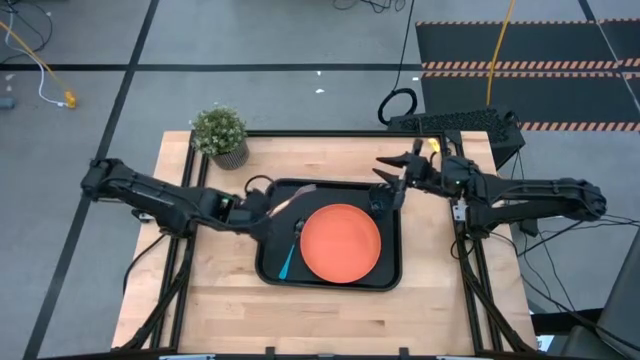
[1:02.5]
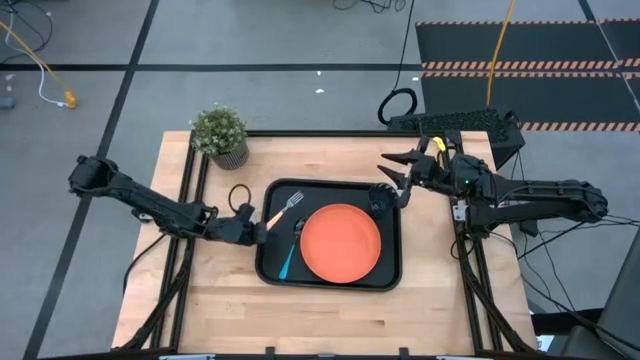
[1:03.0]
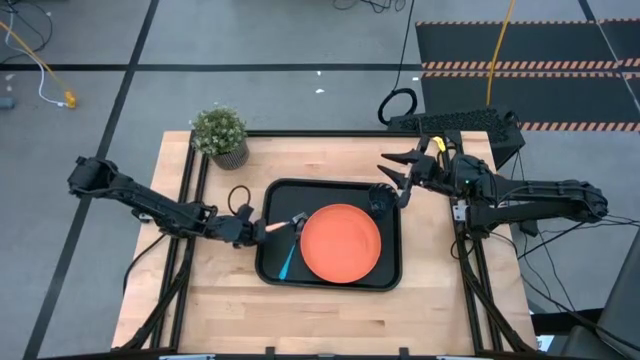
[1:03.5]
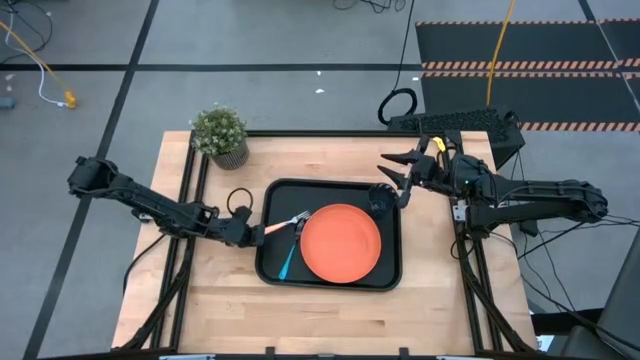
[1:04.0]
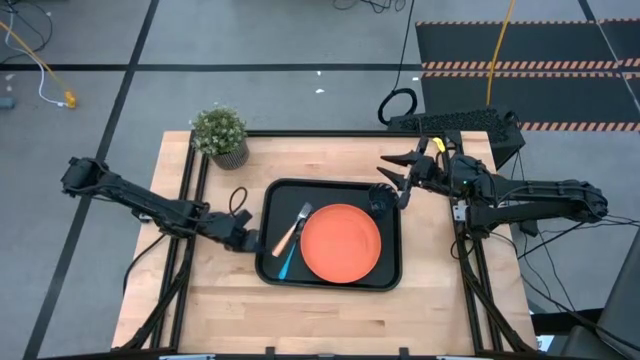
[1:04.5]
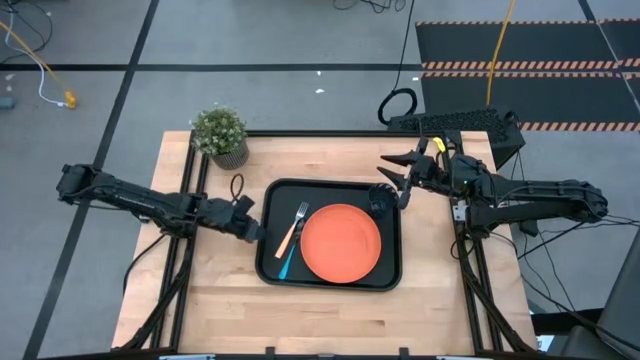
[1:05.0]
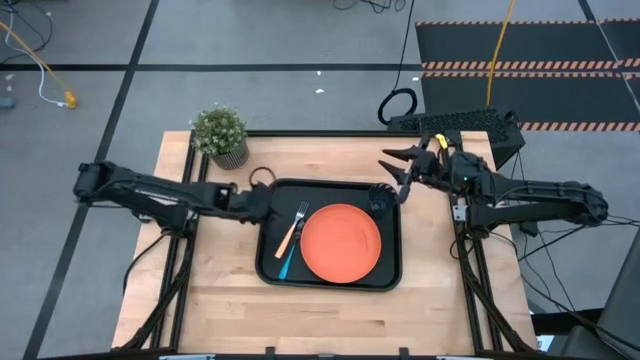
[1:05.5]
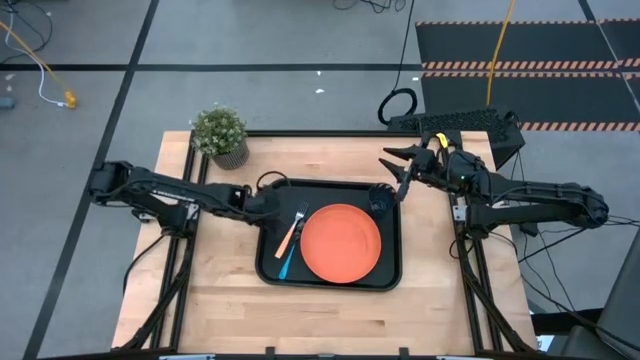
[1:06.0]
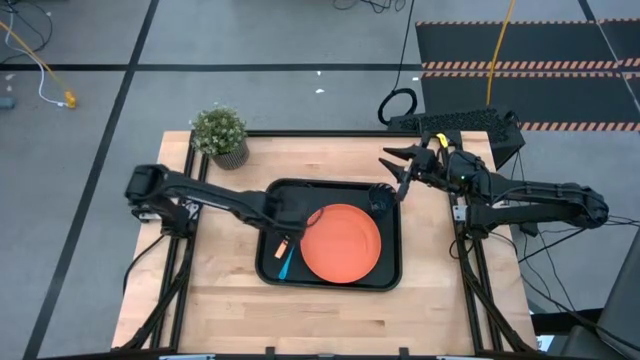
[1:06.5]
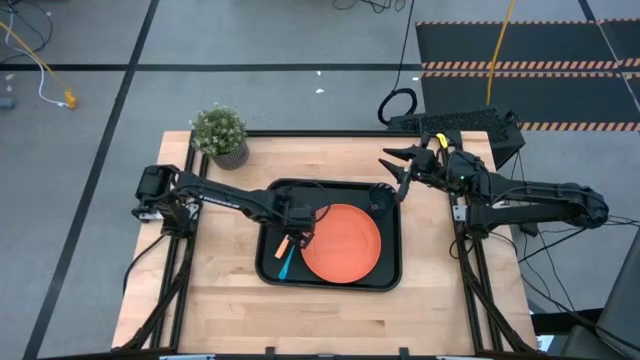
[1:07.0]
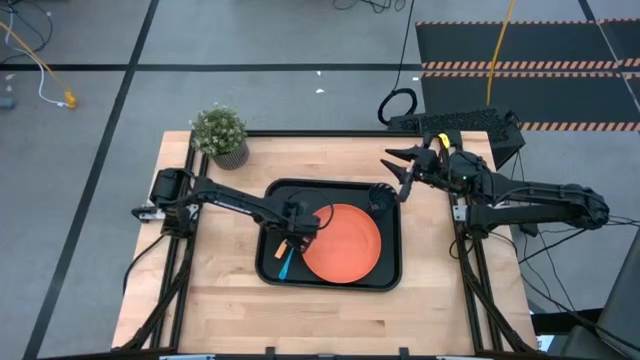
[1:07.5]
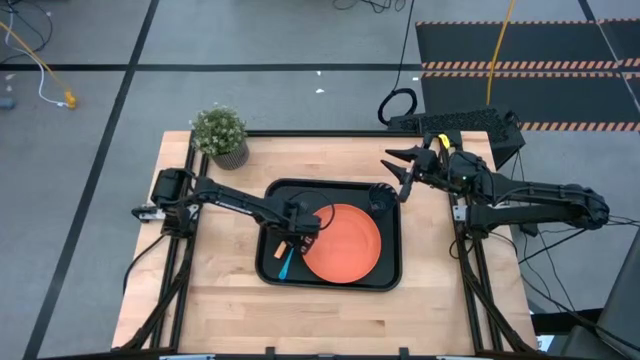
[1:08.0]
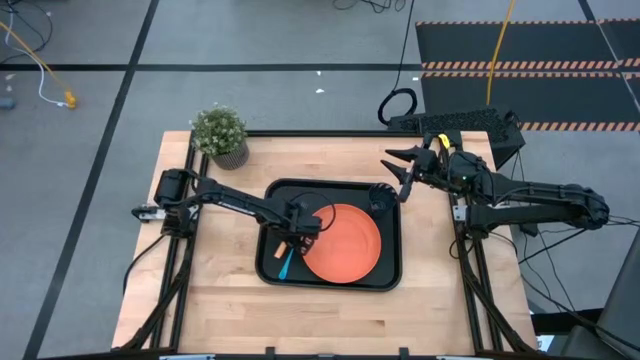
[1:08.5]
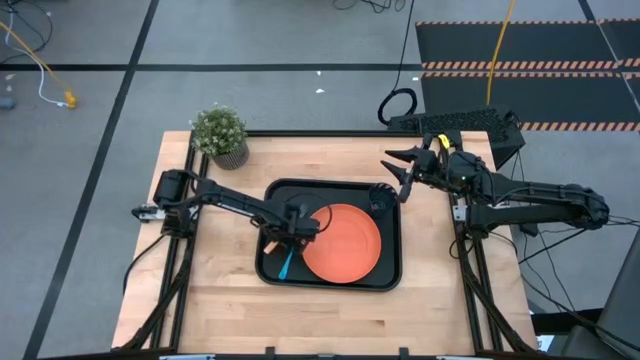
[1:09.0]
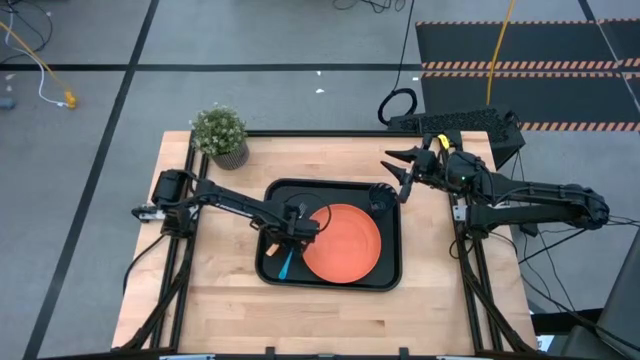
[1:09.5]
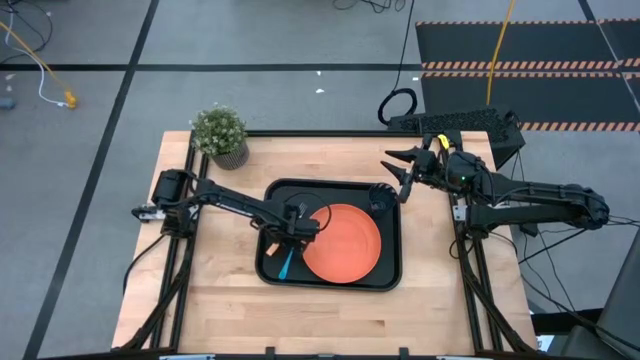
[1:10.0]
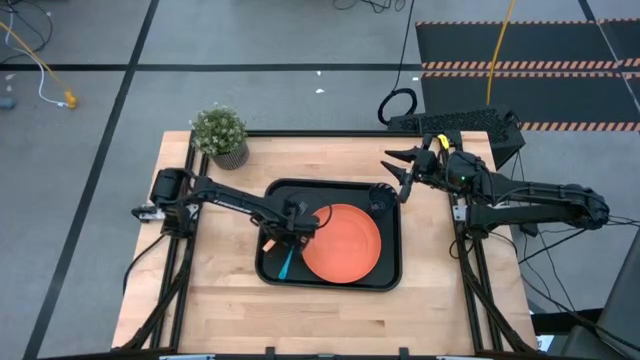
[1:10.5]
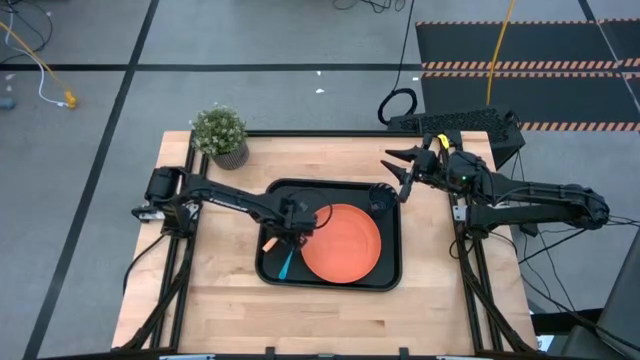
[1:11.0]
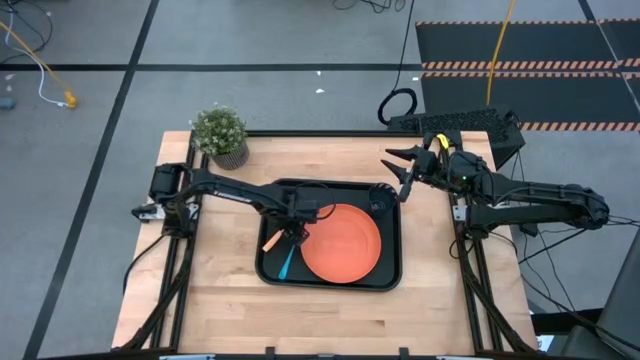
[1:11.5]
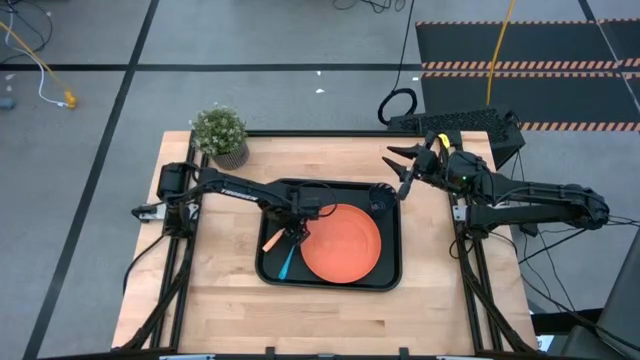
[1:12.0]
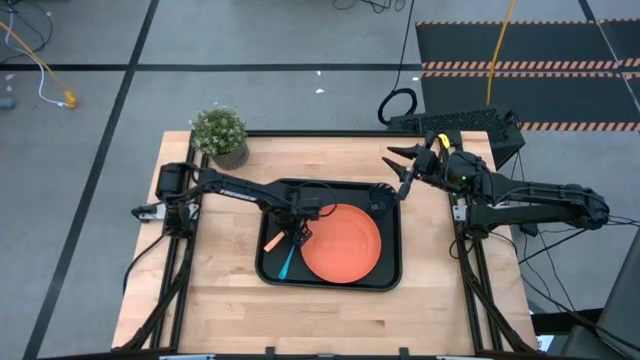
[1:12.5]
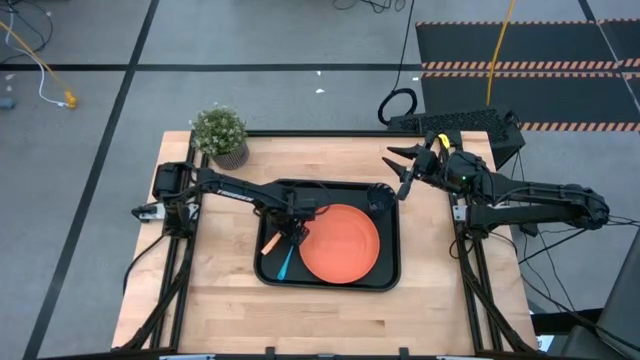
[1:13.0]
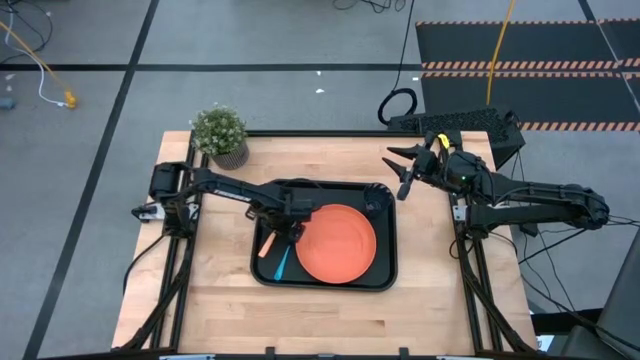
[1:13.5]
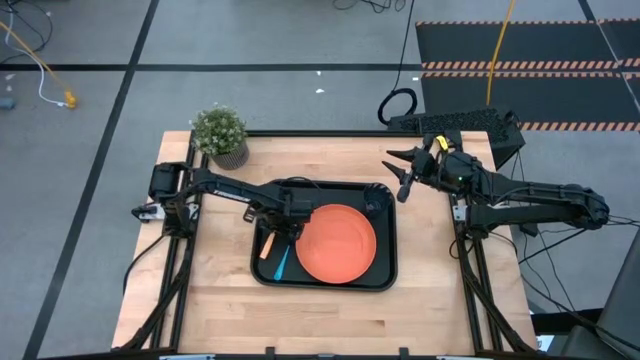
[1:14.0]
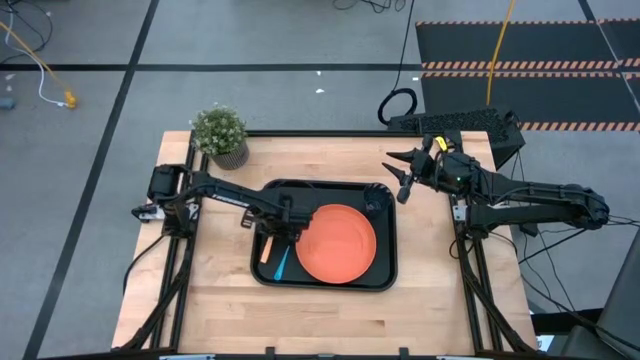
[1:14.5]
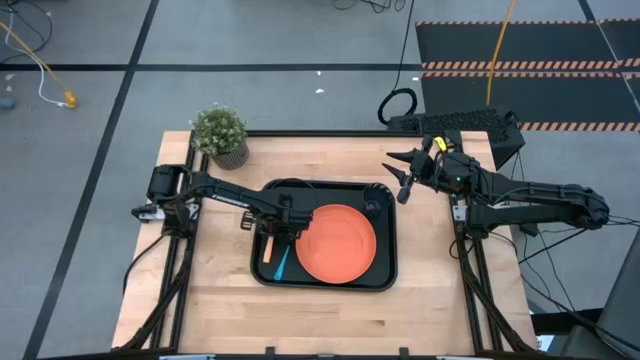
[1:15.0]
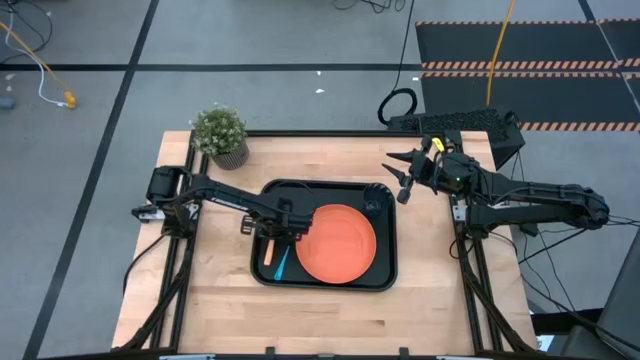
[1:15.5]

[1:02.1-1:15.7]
Task: Pick and place plate/cup/fork/spoon on tray
Adjust the orange fork on the black tray

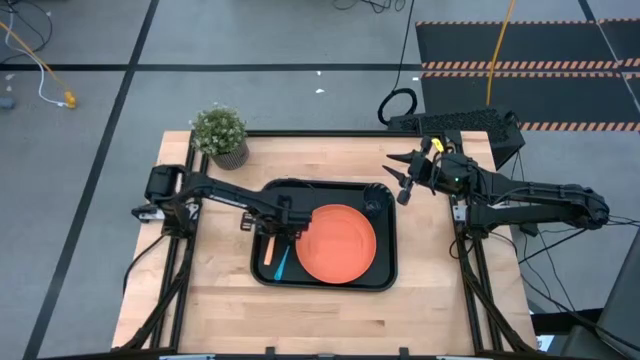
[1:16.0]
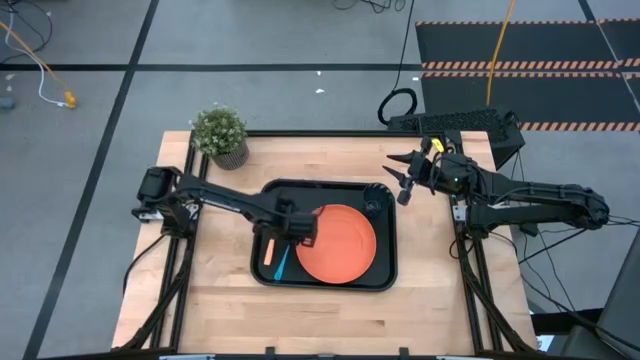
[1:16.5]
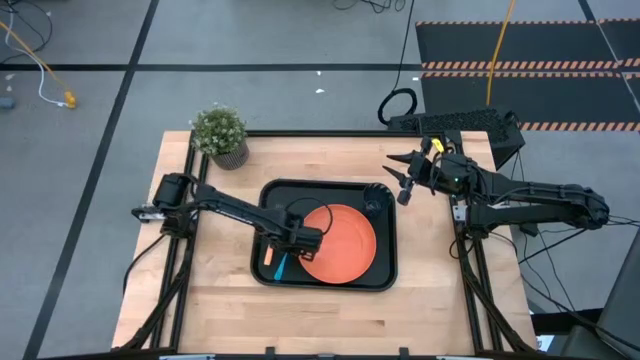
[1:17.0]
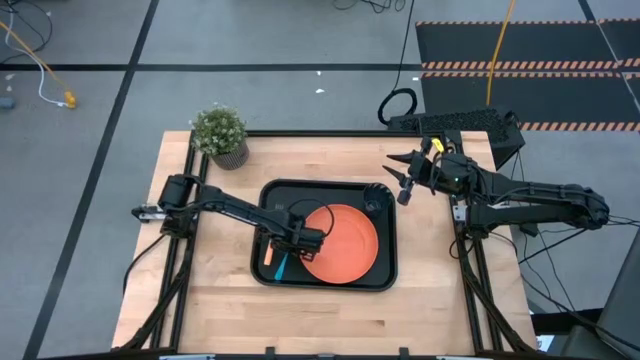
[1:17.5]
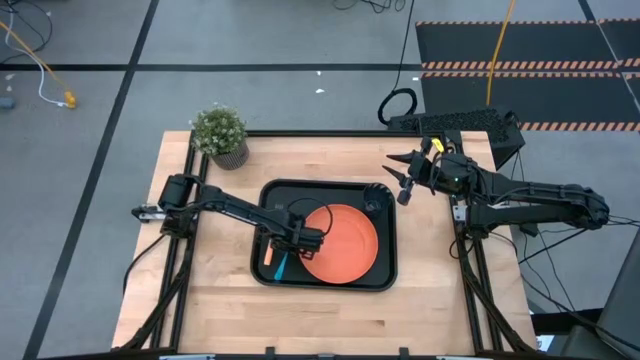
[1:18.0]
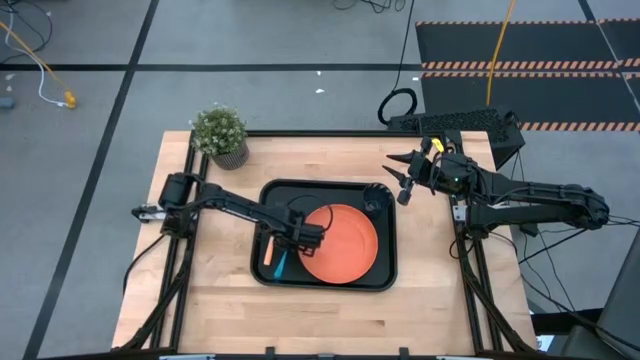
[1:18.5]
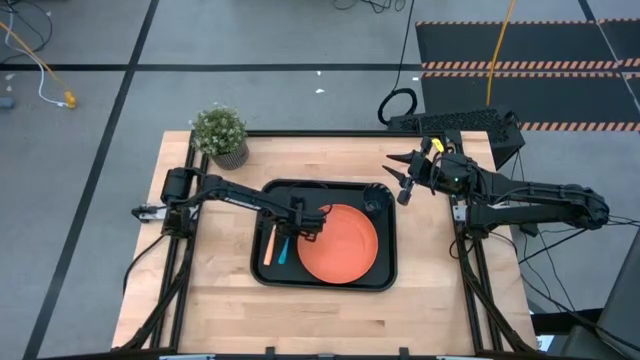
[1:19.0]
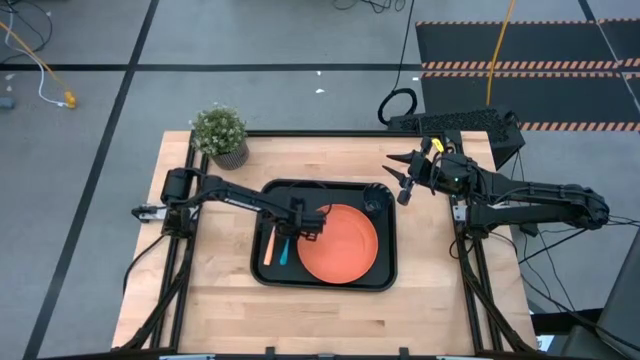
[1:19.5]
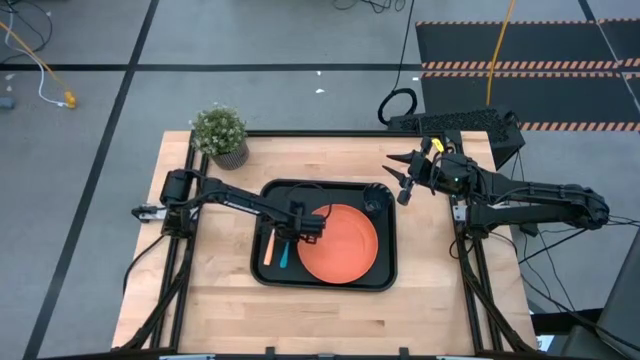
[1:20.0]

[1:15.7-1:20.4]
Adjust the blue spoon on the black tray

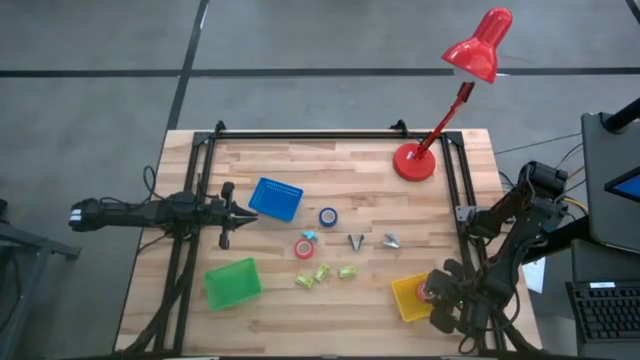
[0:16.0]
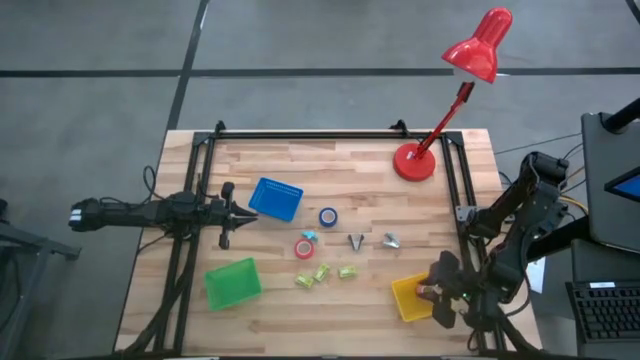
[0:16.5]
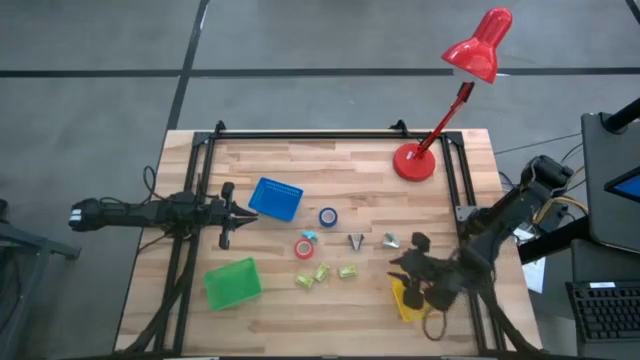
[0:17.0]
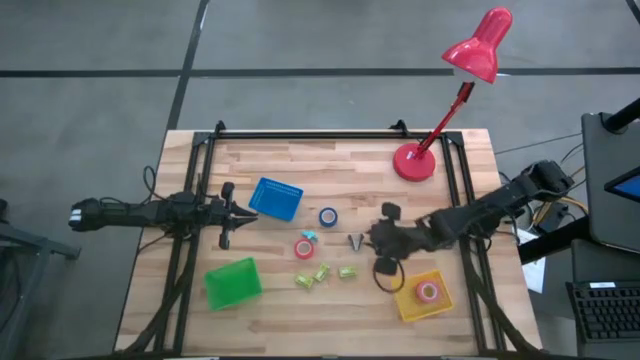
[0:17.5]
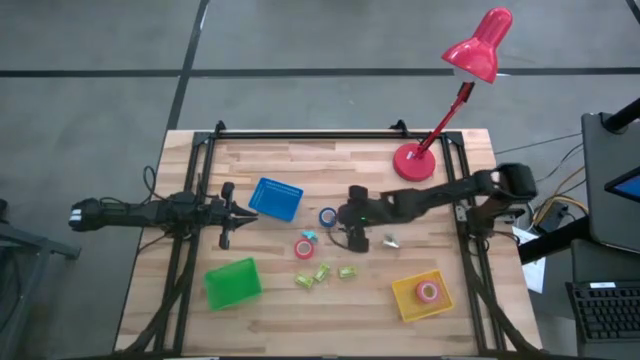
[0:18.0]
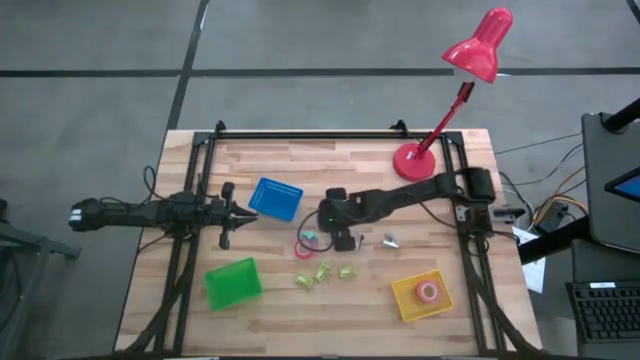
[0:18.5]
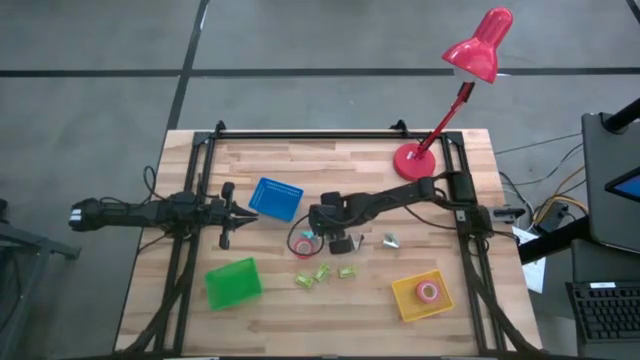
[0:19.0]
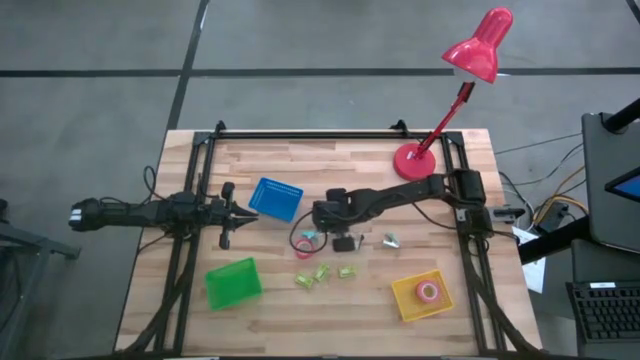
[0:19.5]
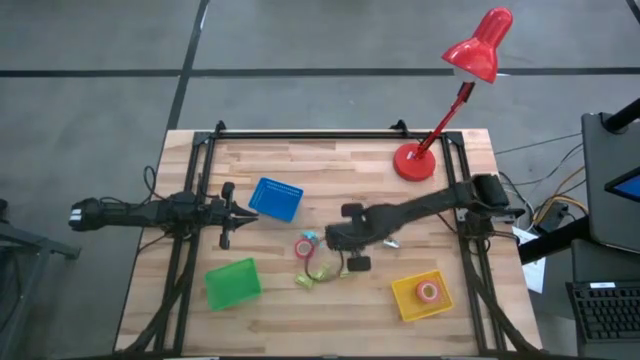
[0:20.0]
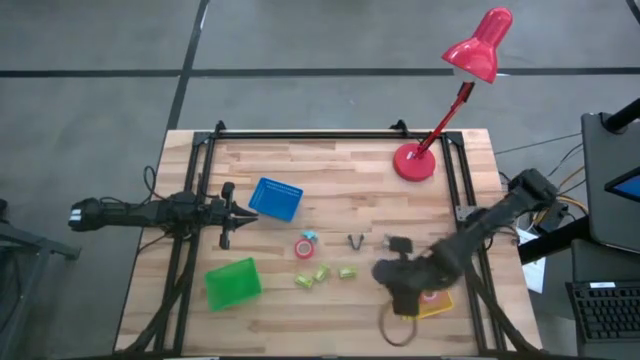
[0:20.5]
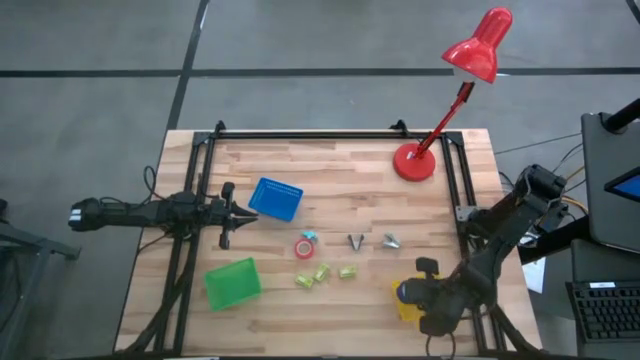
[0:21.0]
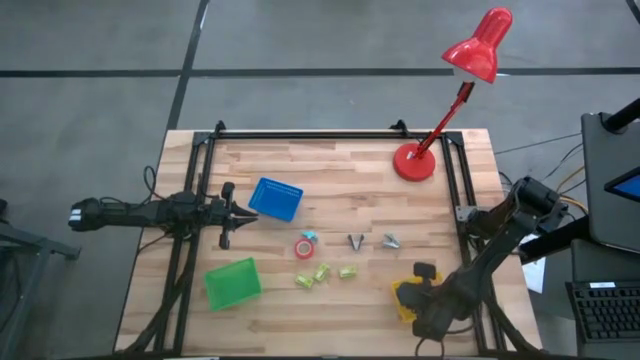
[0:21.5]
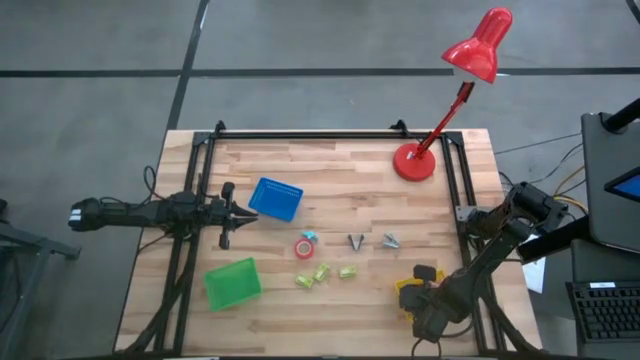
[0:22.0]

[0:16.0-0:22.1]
Task: Pick and place Stapler, Stapler remover, tape
Put the blue tape into the yellow bin
